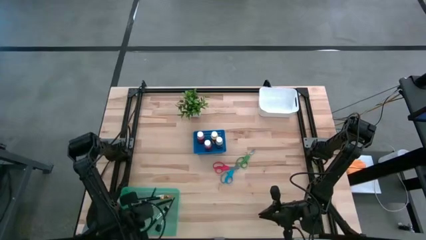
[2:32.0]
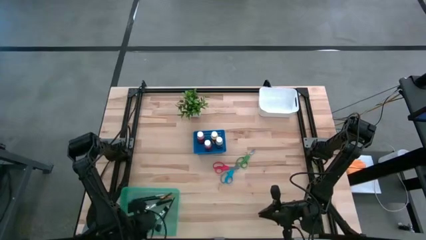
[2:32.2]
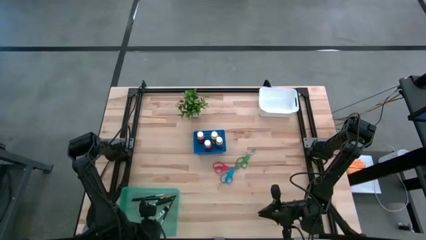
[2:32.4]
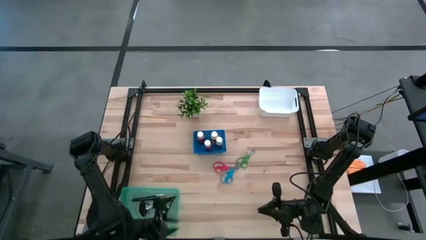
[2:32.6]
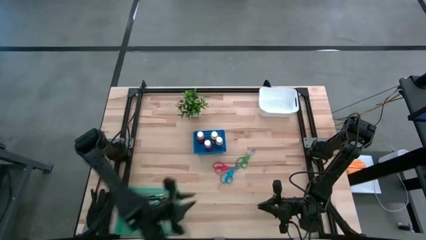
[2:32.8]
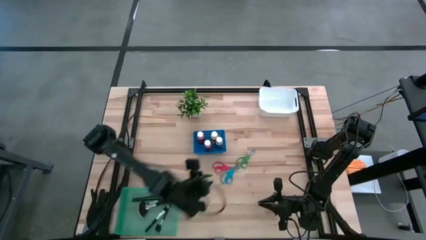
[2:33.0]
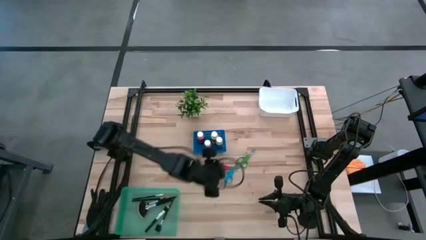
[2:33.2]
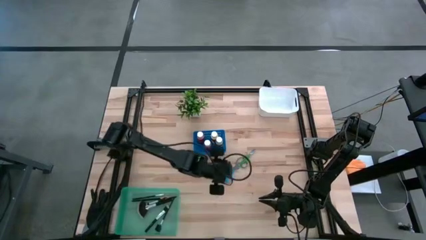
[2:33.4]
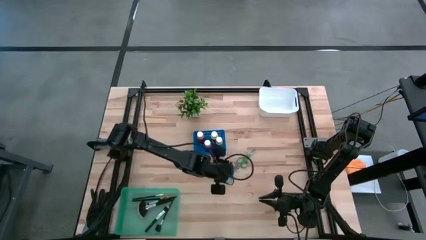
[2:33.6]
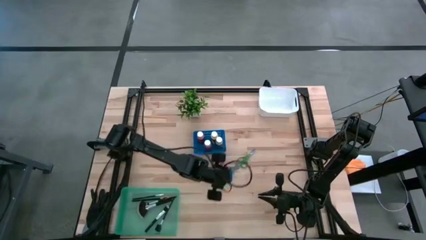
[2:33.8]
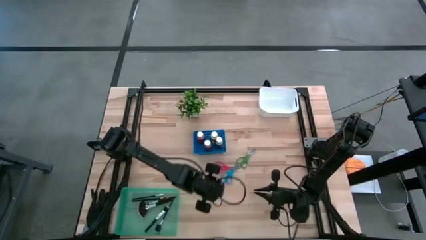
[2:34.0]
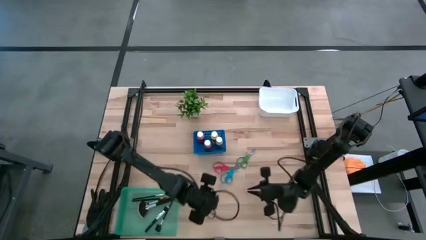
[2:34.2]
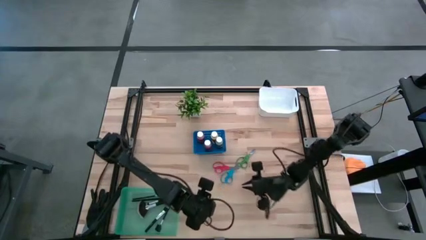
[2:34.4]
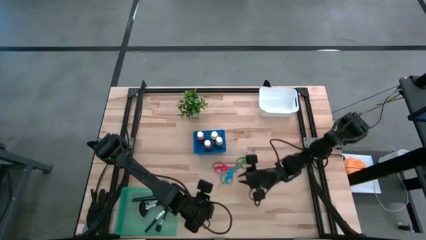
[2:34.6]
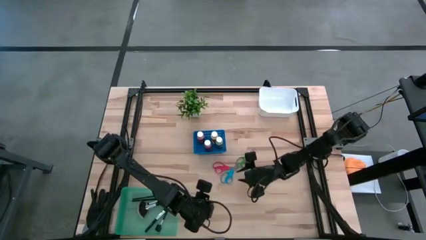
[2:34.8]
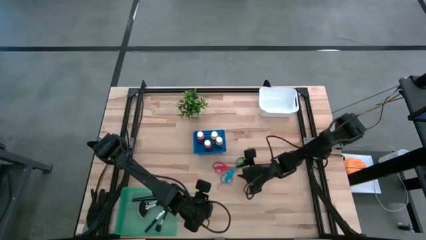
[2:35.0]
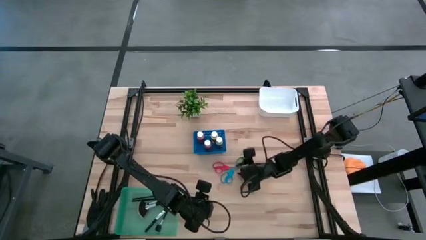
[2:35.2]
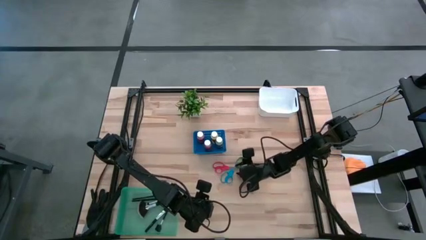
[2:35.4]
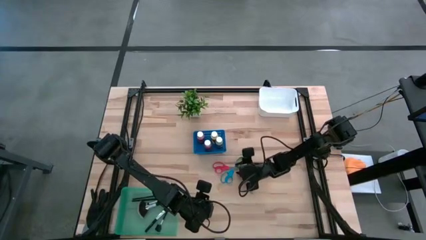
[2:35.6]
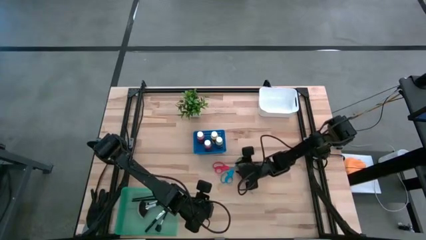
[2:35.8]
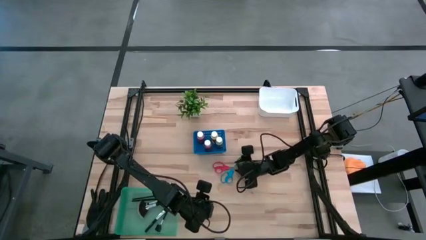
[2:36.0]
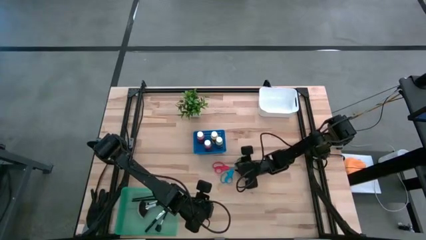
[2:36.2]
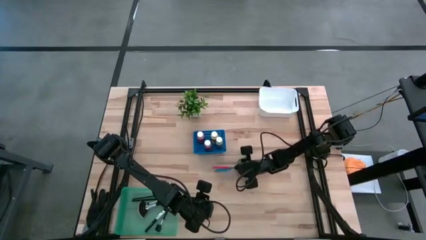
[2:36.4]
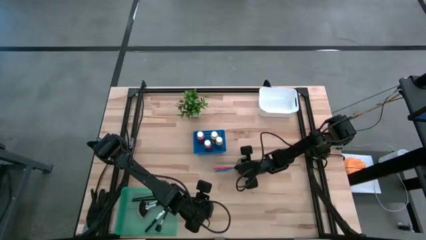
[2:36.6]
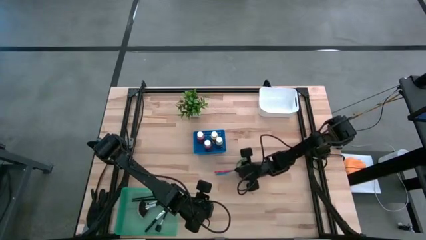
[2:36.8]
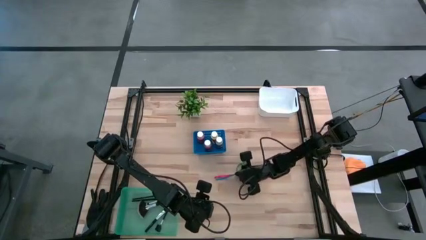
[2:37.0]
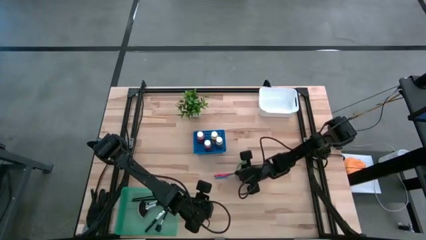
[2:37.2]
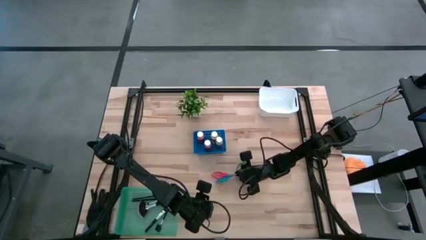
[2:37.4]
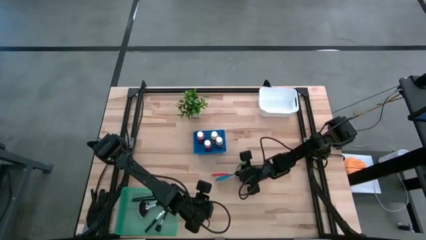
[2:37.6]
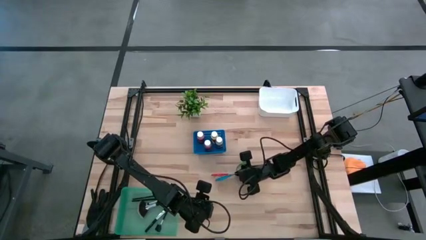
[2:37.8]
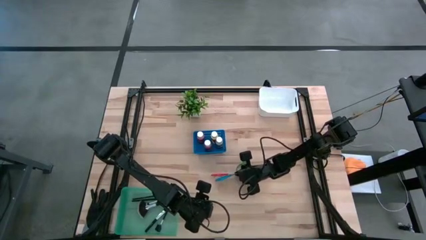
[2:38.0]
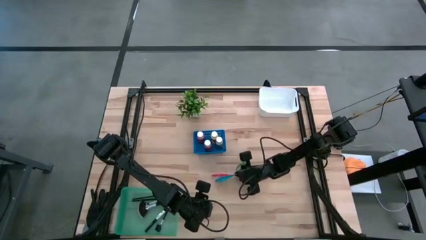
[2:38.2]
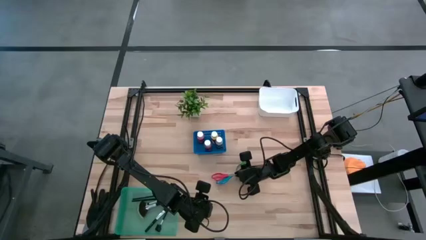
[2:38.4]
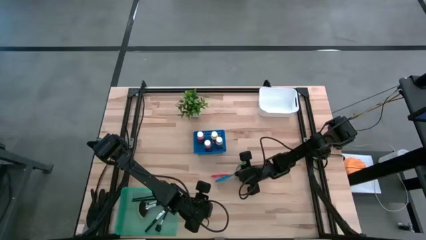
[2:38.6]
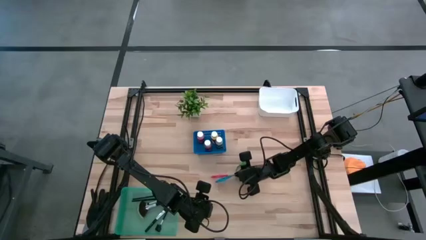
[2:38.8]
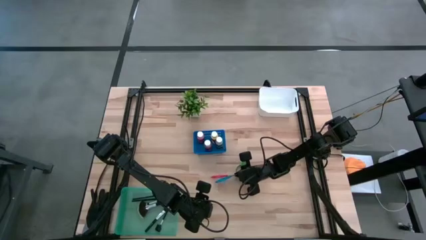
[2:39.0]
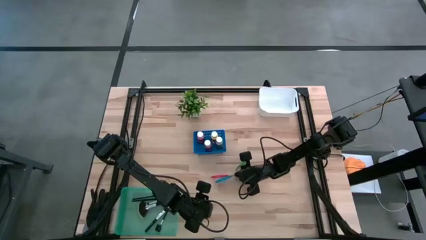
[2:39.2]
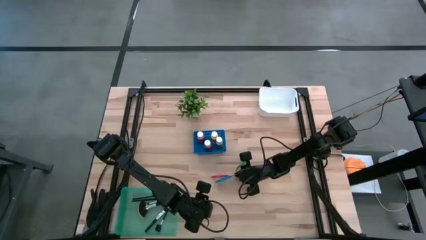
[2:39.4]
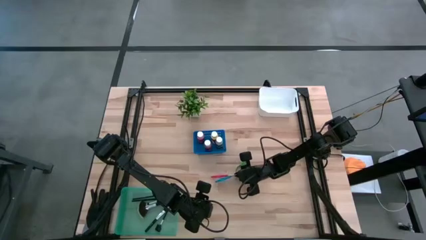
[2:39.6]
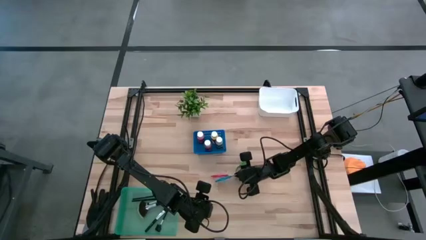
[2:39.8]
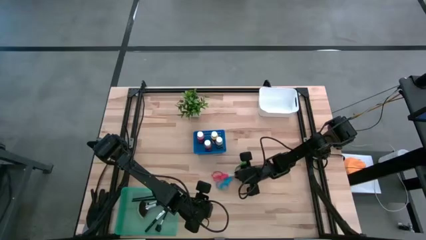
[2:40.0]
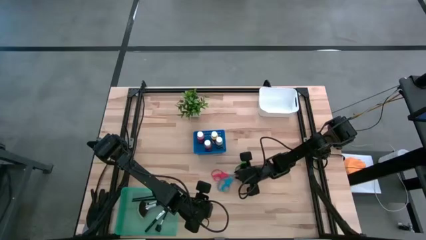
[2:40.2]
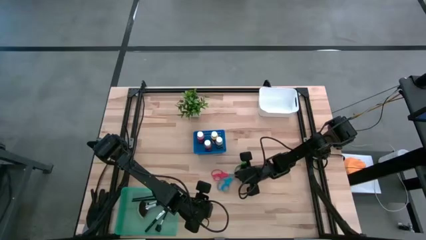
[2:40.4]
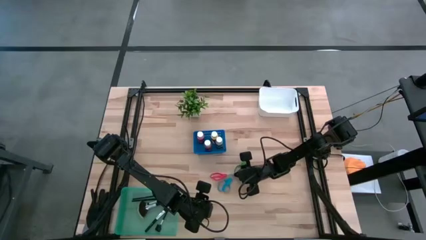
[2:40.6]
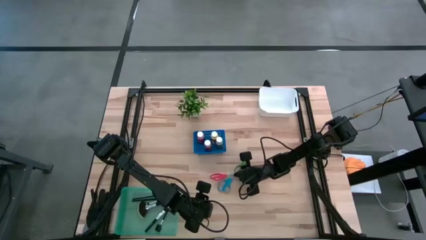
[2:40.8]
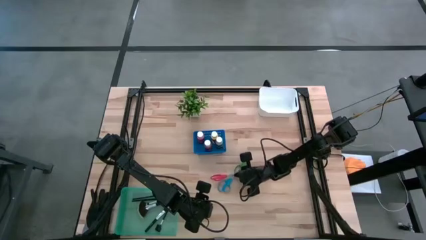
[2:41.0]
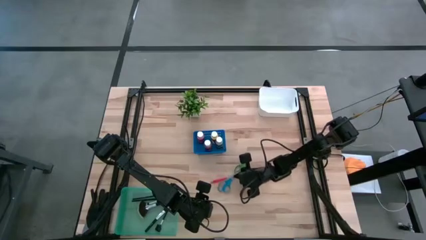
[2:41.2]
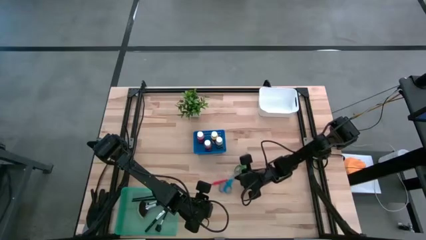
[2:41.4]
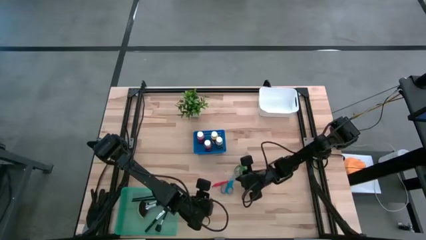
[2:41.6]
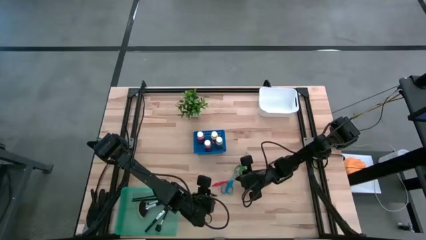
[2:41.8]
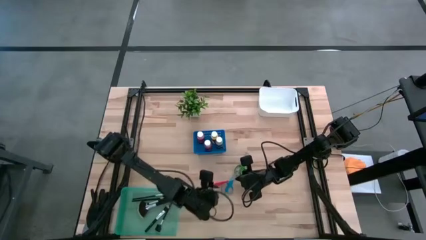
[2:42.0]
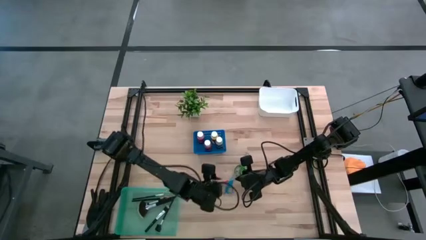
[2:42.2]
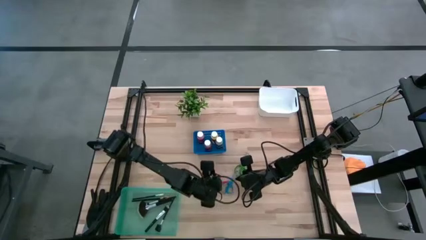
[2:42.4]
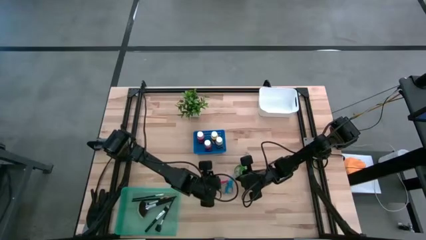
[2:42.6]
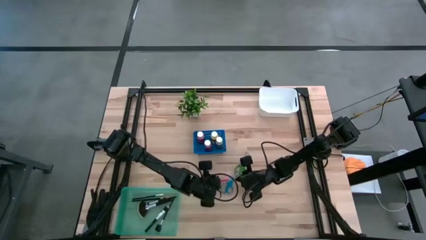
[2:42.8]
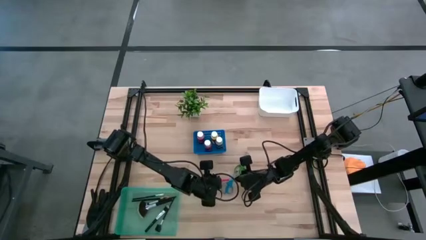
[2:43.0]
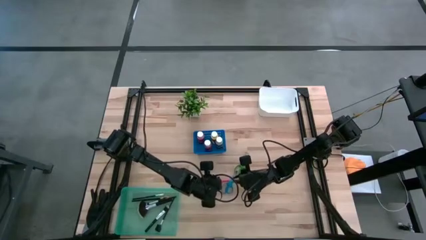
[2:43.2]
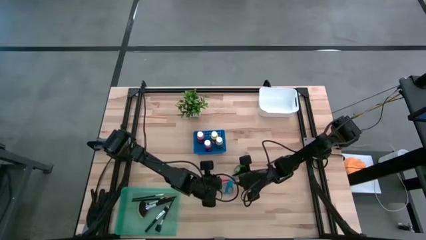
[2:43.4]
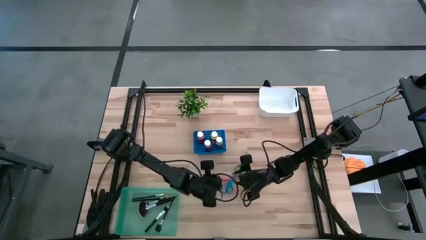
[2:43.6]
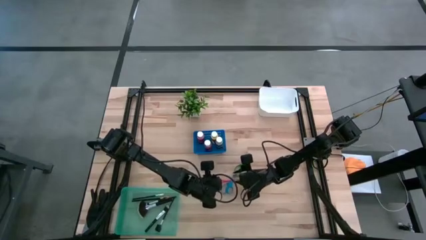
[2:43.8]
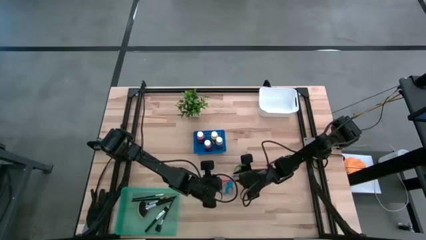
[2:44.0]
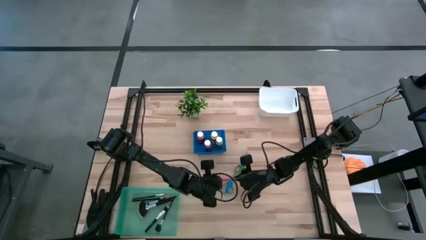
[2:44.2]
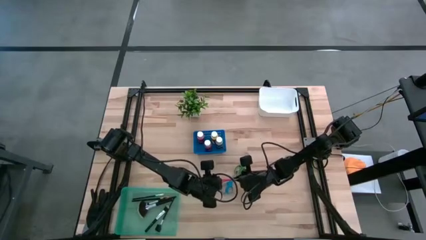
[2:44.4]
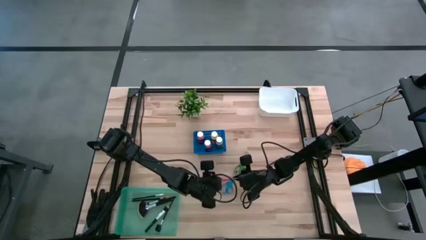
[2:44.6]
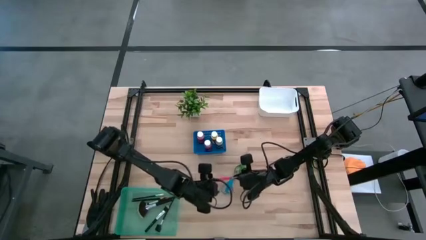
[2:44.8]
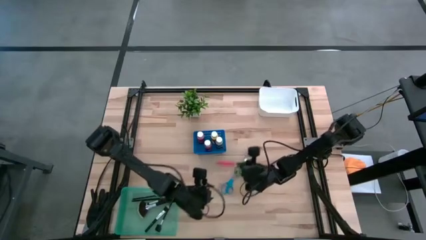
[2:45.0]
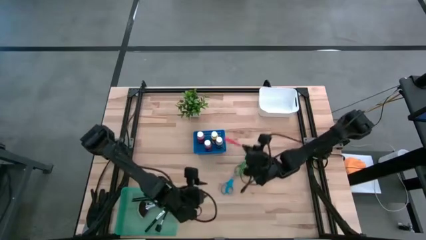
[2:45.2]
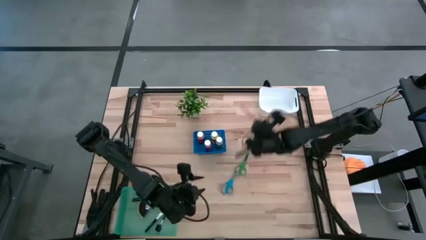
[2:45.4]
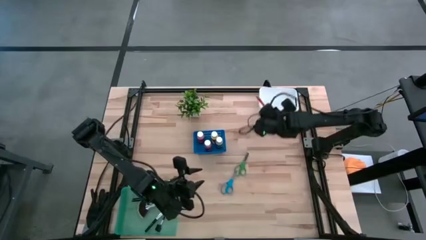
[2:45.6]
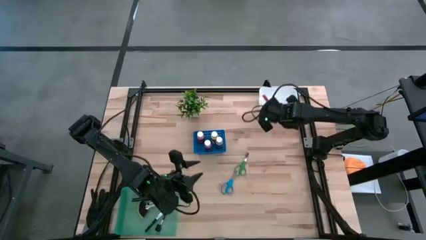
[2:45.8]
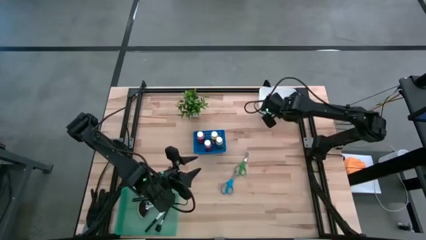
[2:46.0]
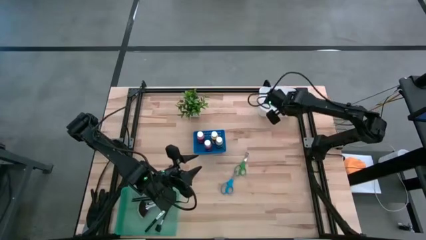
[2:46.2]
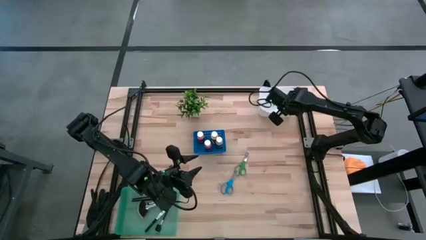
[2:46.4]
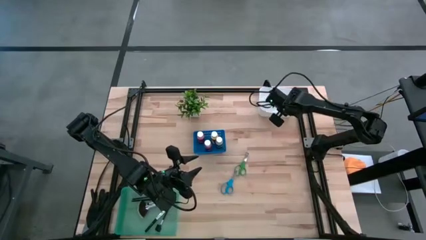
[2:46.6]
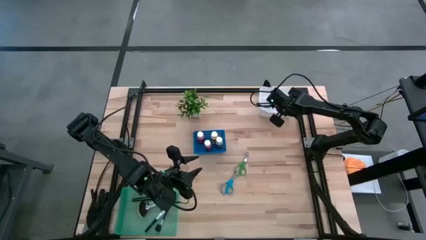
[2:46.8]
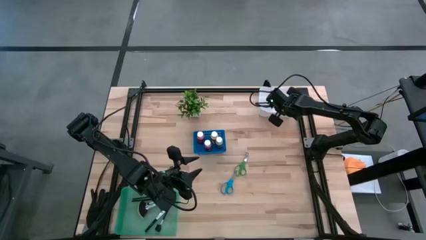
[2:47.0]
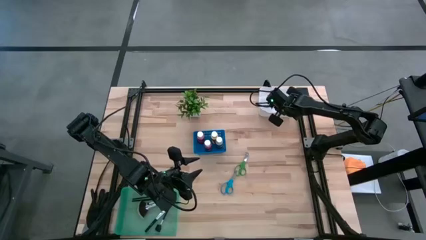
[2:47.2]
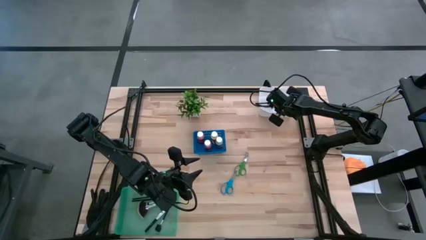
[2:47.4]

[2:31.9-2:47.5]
Task: Pick & Place Paint Supplies
Put the red scissor into the white bin
